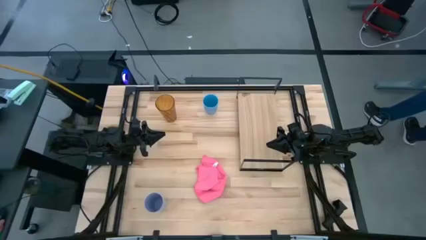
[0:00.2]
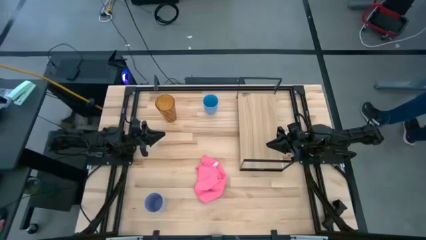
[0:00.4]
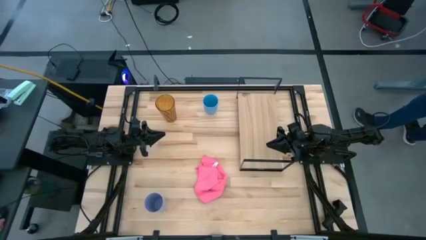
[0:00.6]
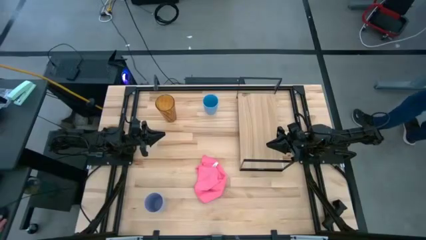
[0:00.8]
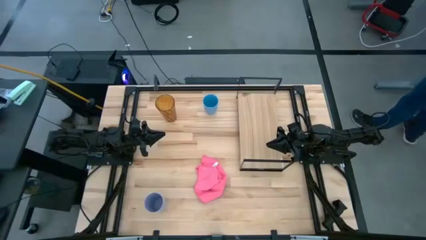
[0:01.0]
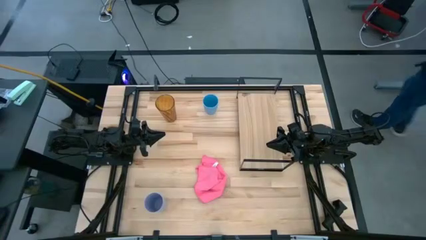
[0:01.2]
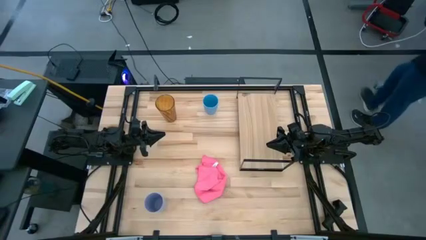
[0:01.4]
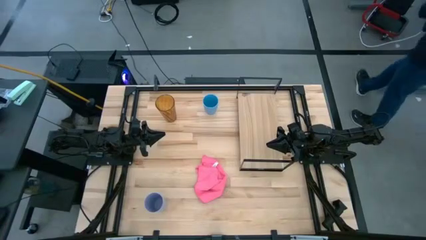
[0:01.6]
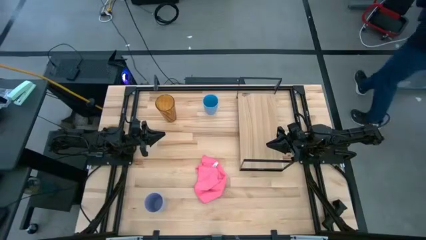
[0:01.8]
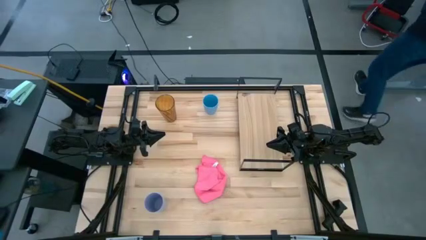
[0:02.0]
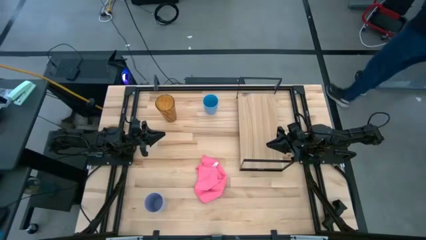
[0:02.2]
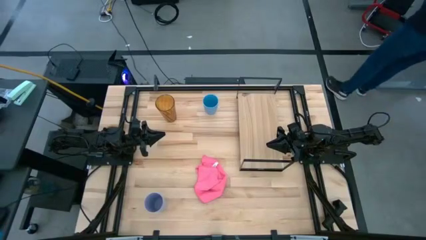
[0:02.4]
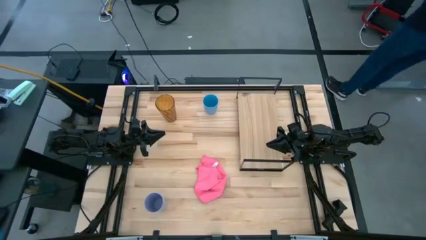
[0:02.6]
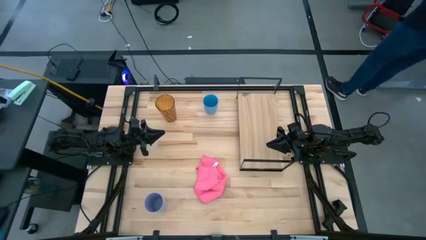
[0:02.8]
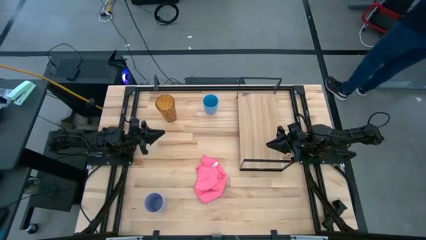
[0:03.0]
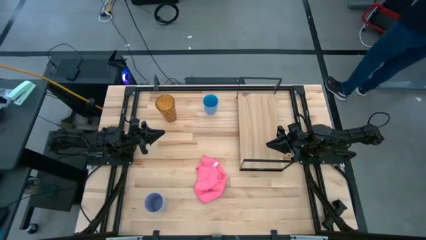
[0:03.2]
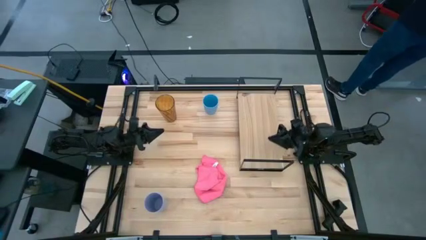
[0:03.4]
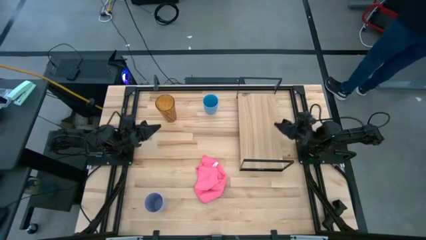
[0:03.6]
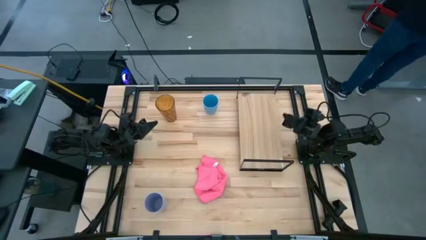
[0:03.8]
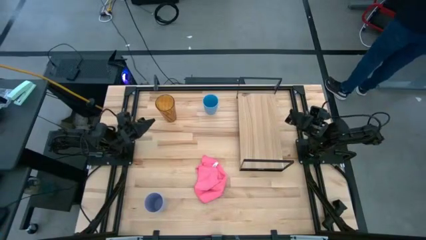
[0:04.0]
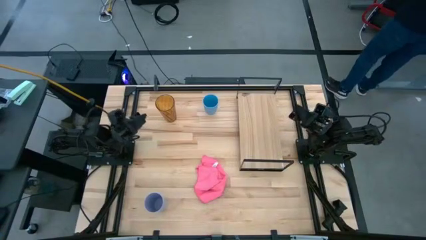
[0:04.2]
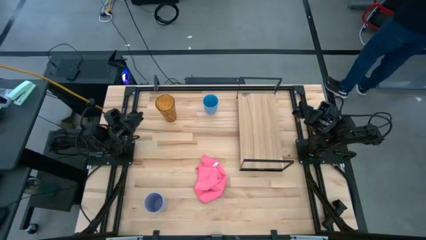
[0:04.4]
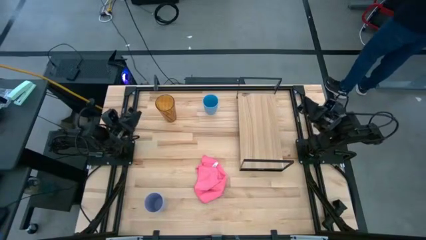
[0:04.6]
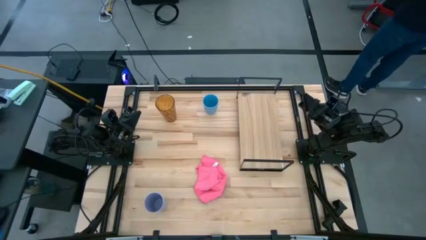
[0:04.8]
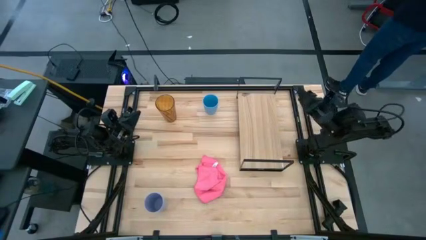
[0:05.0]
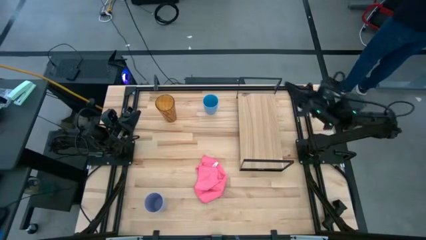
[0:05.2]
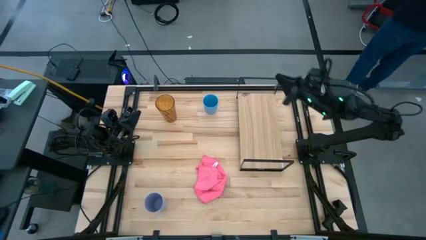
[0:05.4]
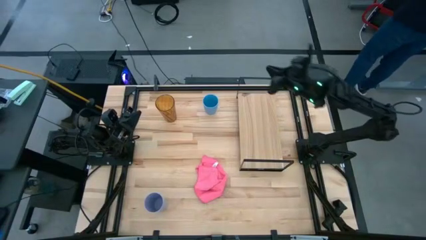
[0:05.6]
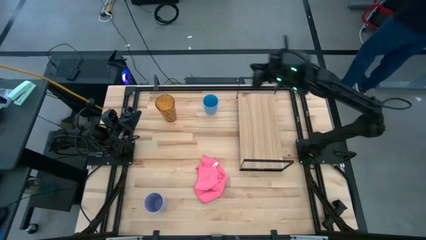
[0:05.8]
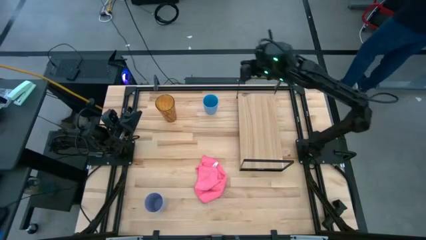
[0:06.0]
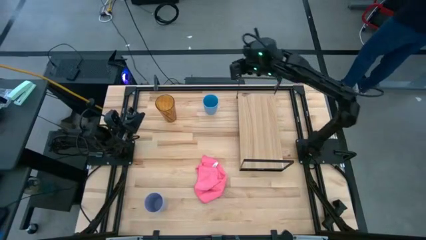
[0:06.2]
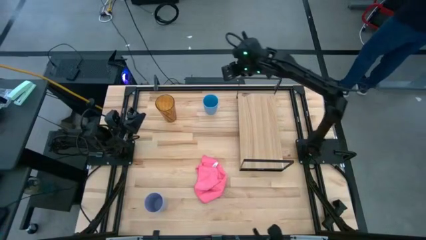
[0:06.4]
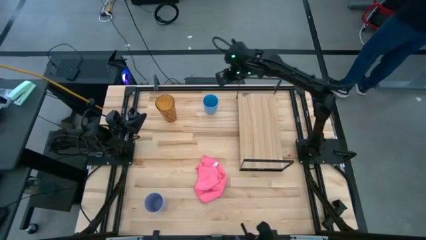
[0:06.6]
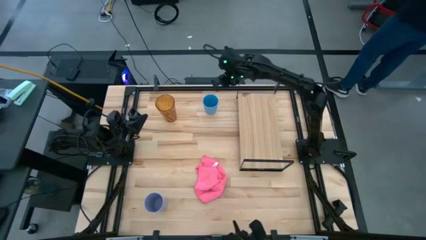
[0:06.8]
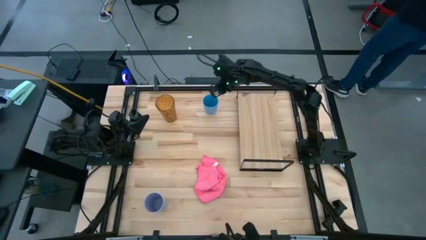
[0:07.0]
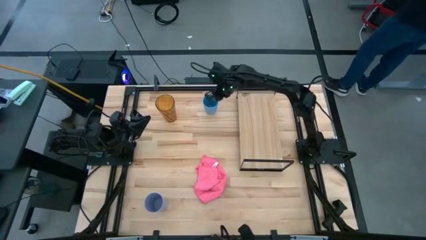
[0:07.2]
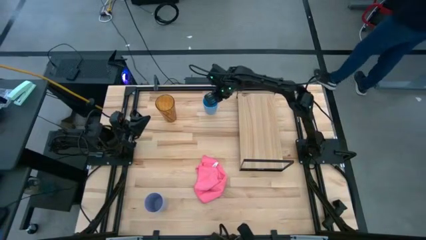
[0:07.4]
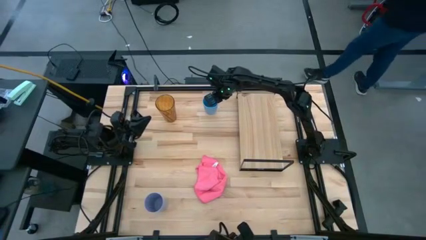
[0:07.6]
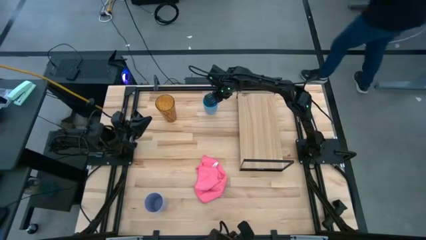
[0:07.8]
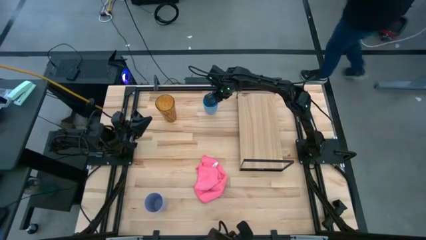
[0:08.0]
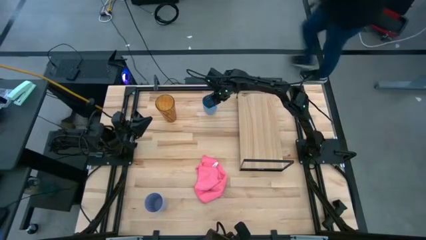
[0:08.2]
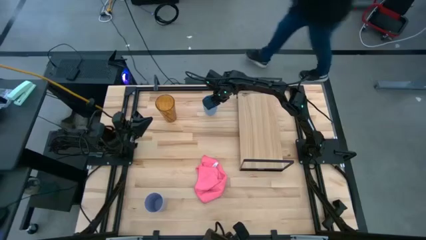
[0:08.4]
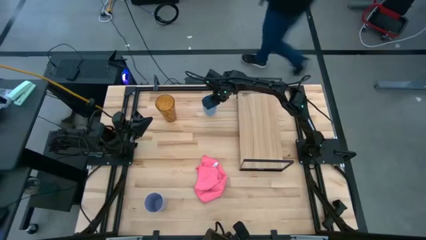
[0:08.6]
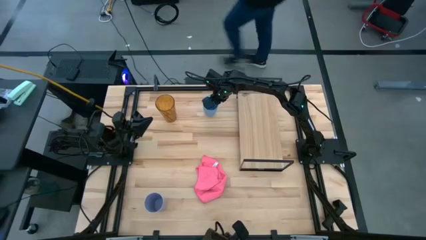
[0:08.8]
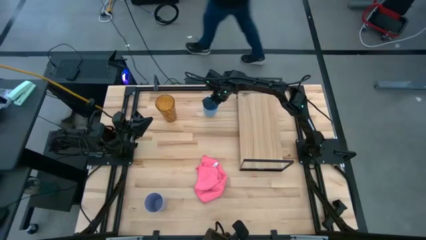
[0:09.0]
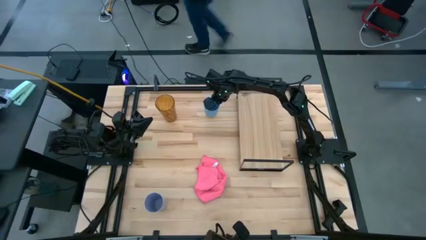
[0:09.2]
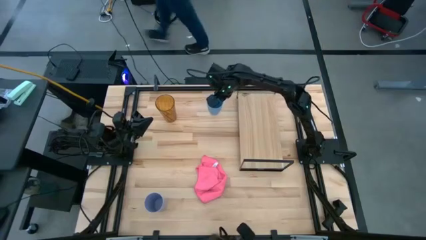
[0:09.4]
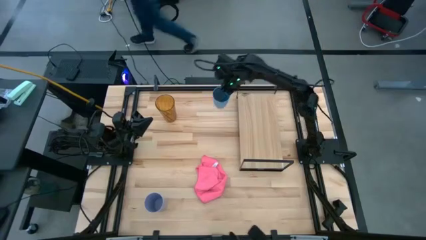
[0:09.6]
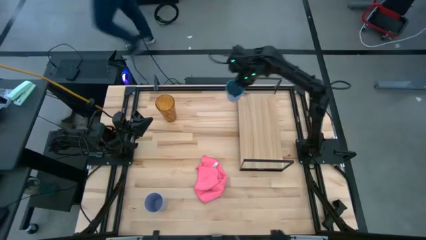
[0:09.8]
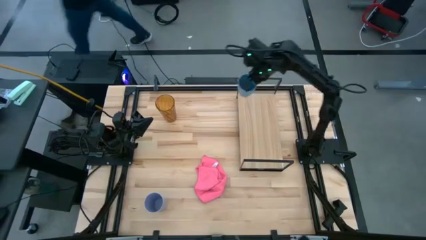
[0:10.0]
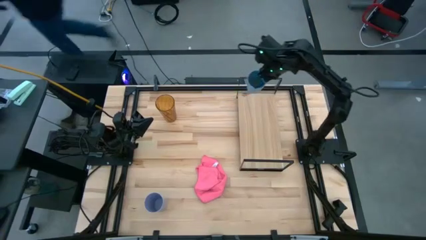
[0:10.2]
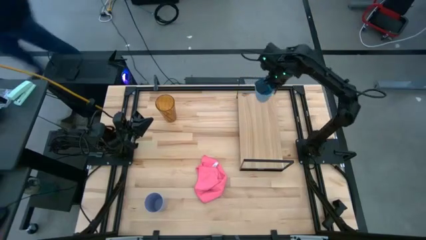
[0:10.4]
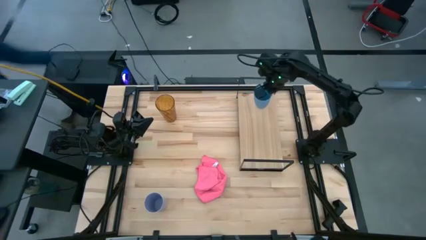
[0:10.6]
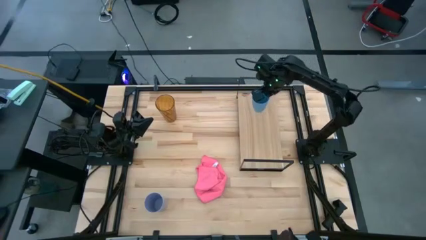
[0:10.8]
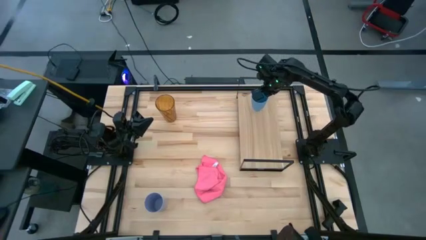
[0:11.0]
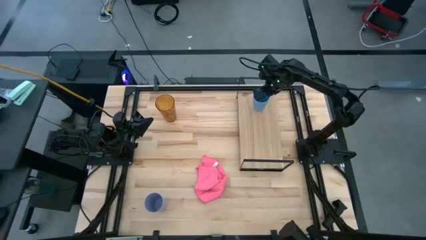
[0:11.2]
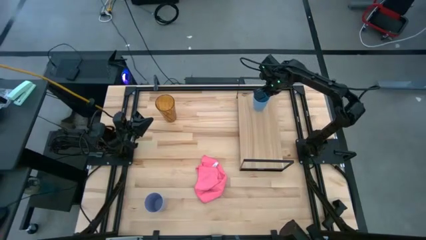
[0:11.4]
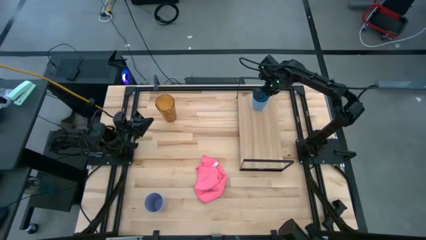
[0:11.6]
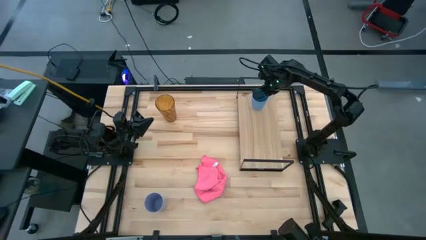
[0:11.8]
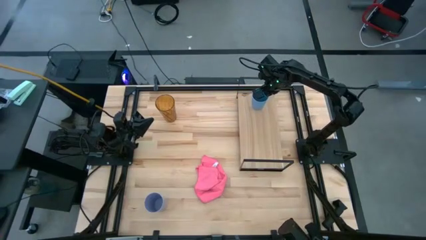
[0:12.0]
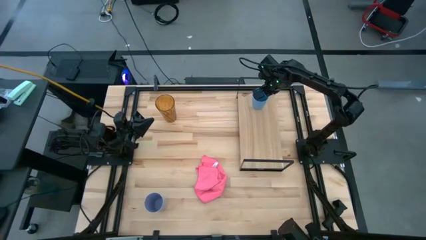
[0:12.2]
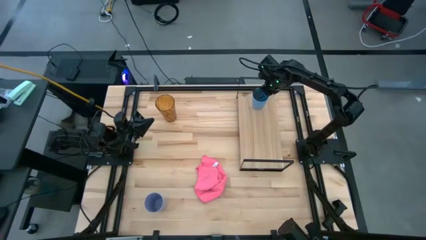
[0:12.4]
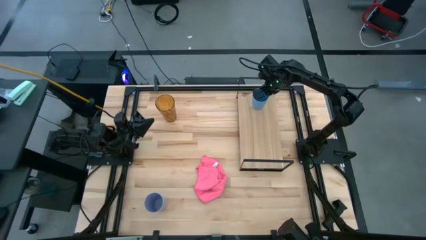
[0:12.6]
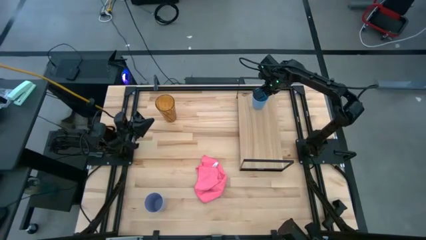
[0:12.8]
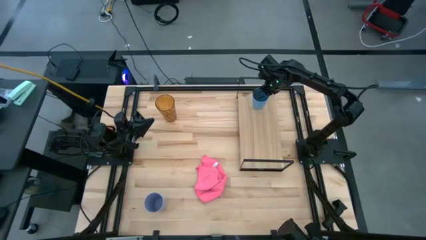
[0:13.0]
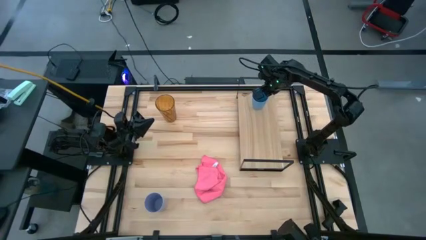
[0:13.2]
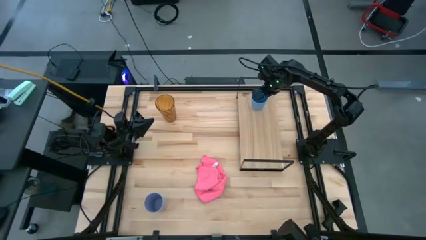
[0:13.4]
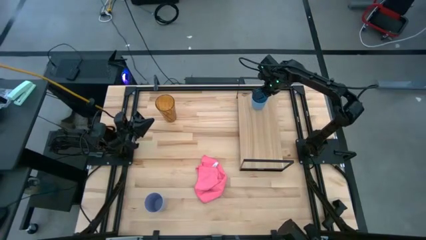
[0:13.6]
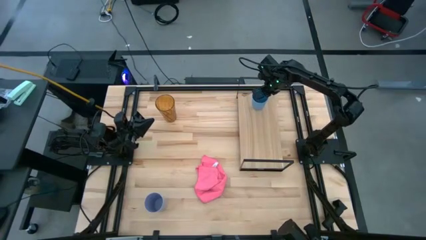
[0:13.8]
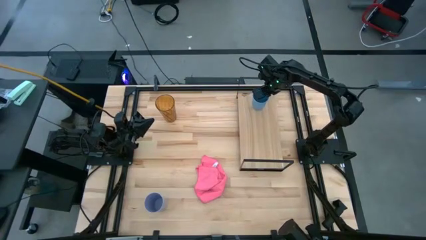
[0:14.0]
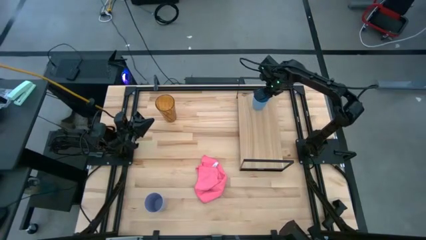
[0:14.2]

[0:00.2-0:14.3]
Task: Stack small to large cups/mugs on shelf
Put the light blue cup on the shelf
